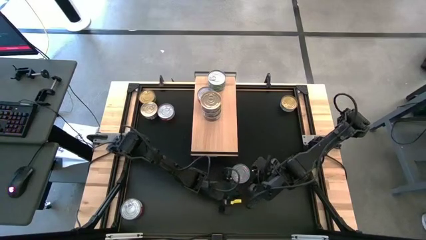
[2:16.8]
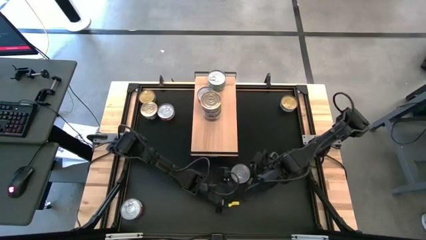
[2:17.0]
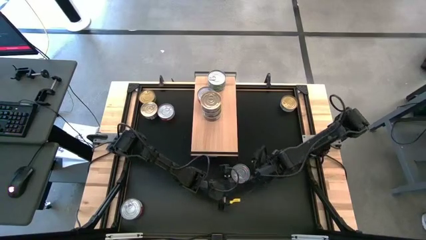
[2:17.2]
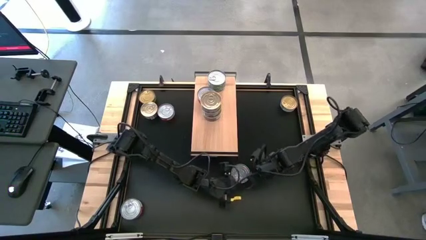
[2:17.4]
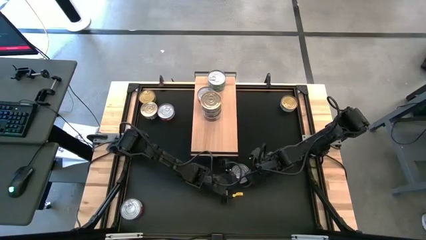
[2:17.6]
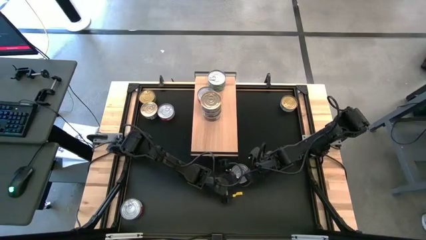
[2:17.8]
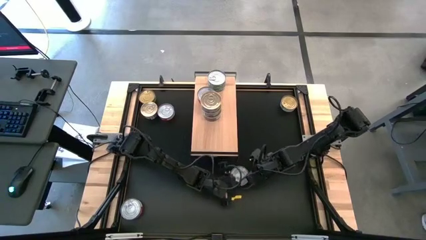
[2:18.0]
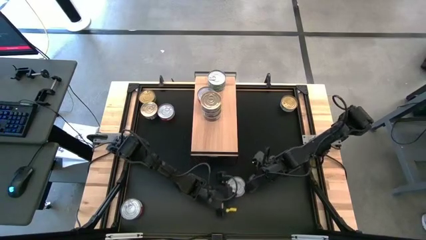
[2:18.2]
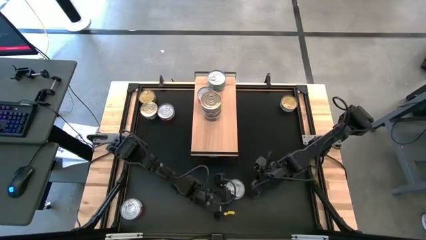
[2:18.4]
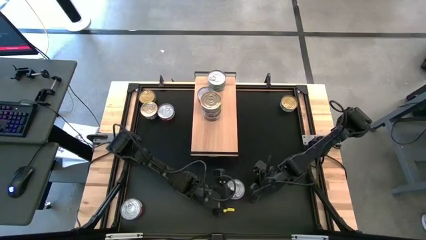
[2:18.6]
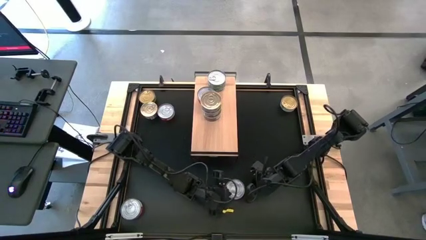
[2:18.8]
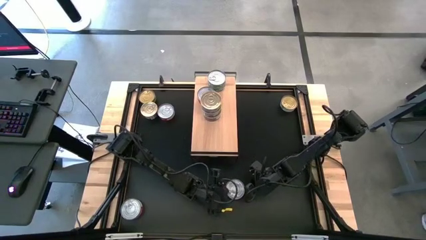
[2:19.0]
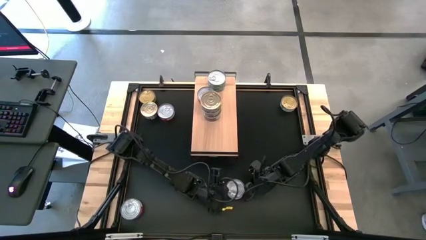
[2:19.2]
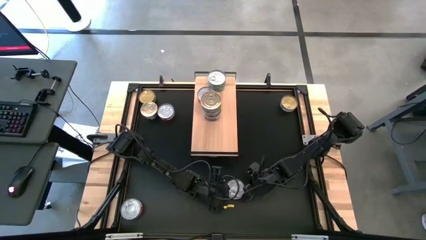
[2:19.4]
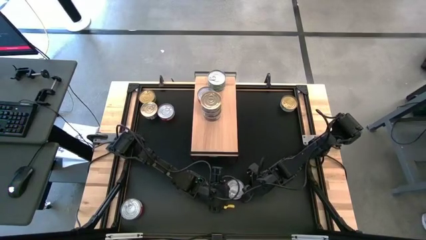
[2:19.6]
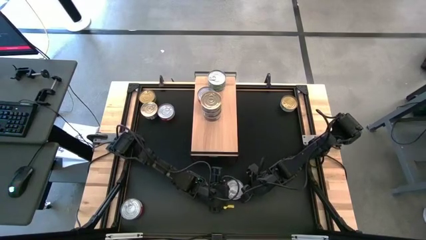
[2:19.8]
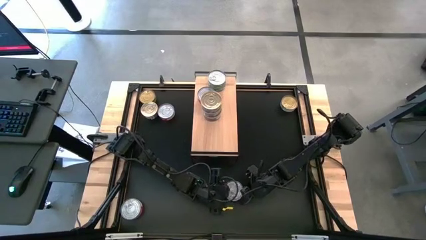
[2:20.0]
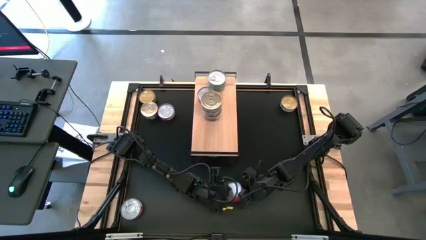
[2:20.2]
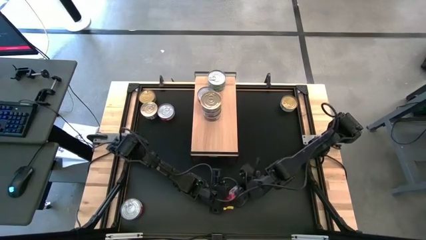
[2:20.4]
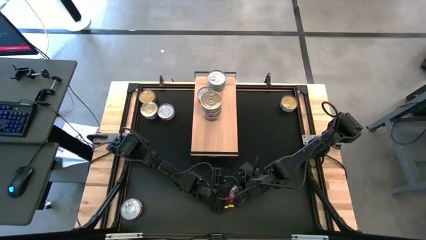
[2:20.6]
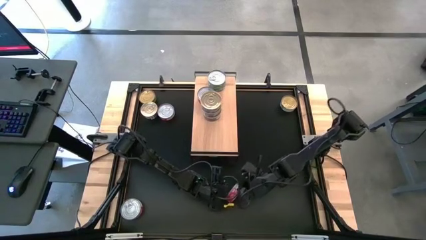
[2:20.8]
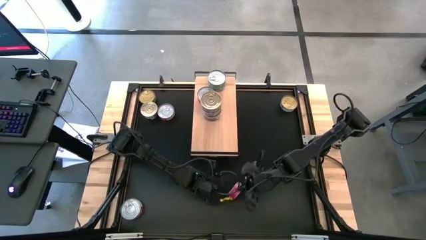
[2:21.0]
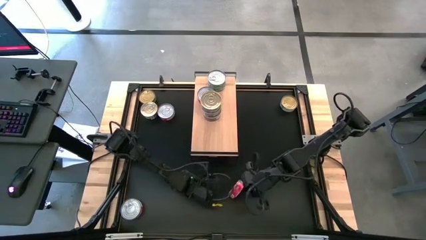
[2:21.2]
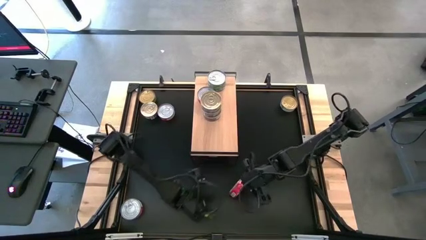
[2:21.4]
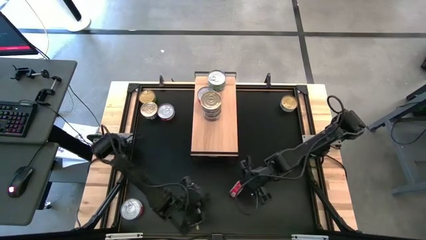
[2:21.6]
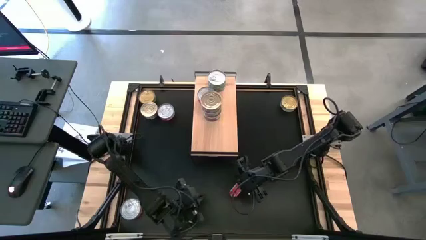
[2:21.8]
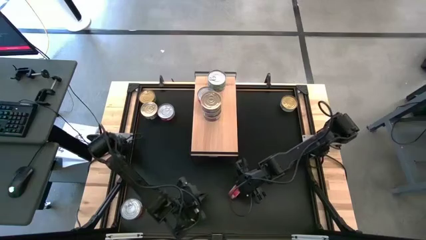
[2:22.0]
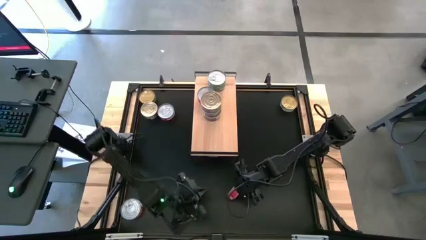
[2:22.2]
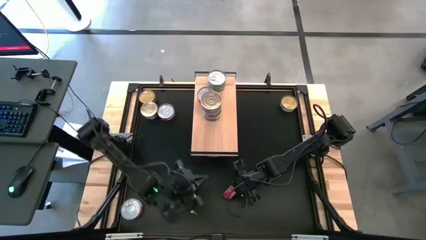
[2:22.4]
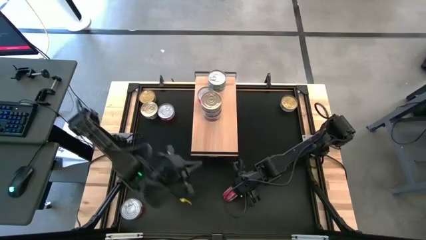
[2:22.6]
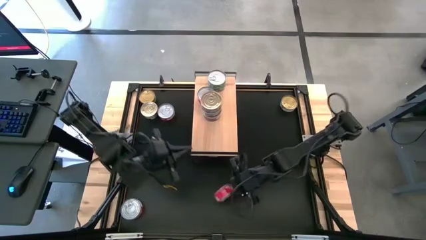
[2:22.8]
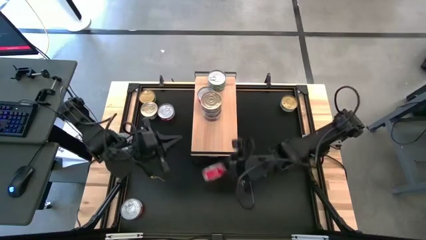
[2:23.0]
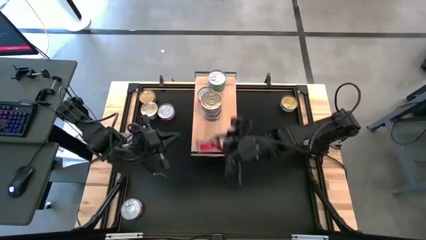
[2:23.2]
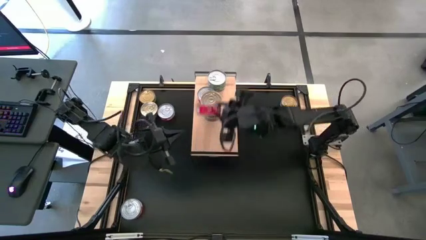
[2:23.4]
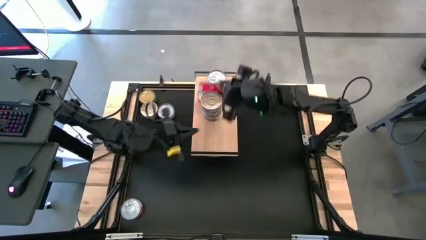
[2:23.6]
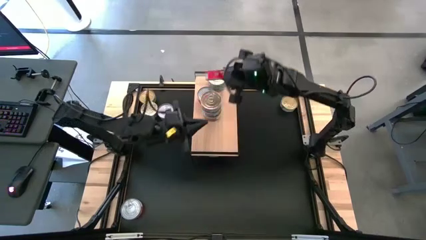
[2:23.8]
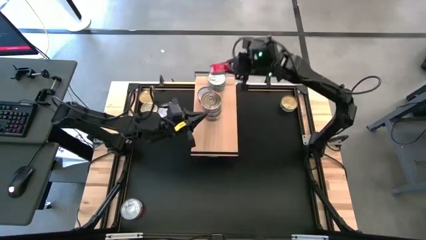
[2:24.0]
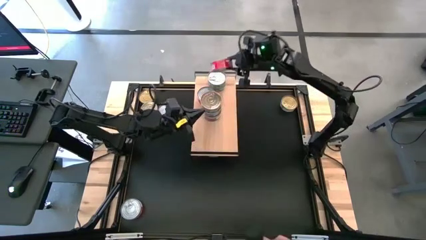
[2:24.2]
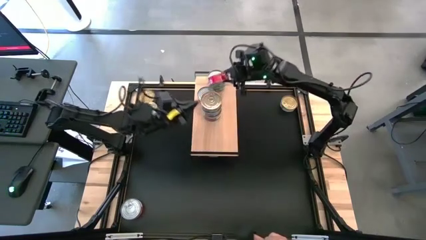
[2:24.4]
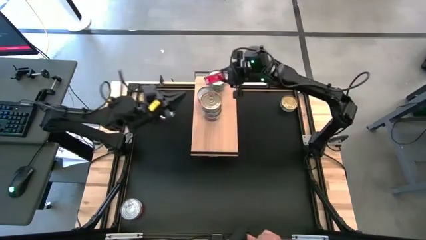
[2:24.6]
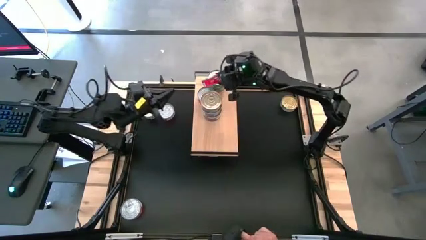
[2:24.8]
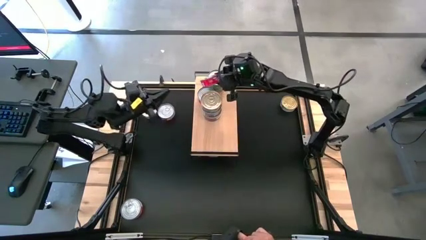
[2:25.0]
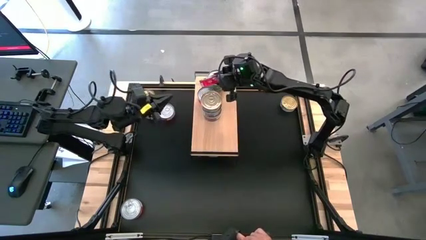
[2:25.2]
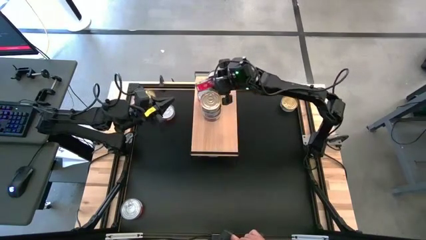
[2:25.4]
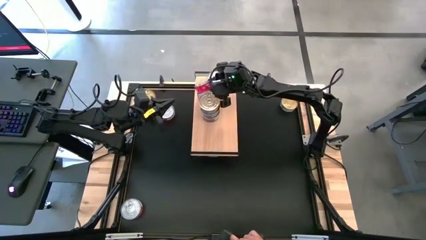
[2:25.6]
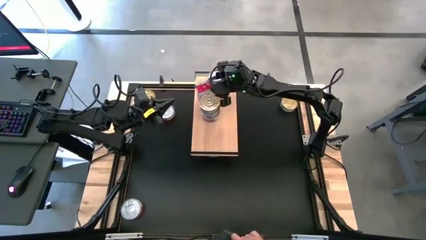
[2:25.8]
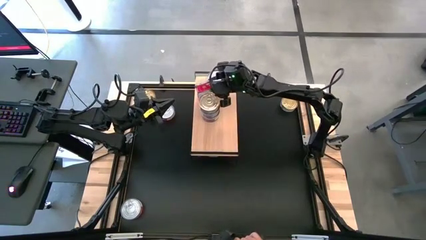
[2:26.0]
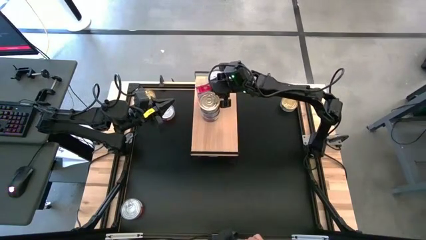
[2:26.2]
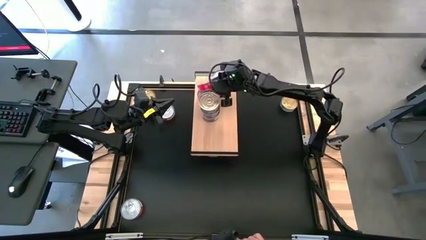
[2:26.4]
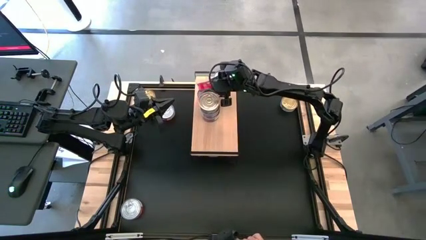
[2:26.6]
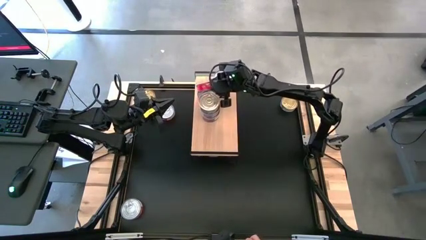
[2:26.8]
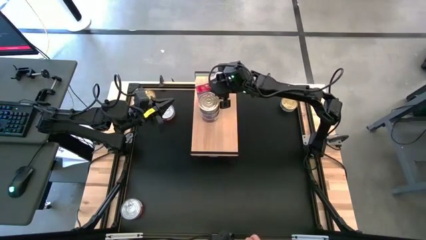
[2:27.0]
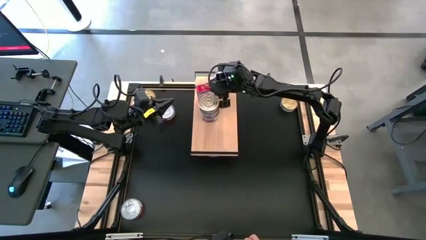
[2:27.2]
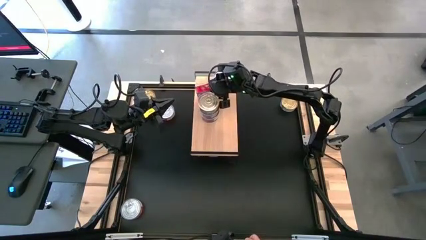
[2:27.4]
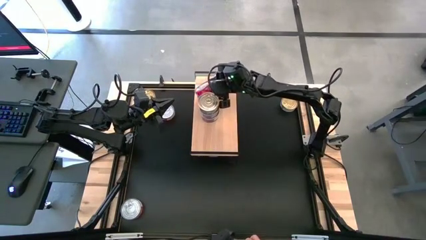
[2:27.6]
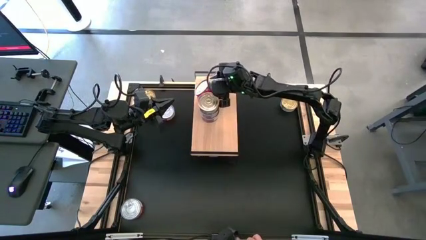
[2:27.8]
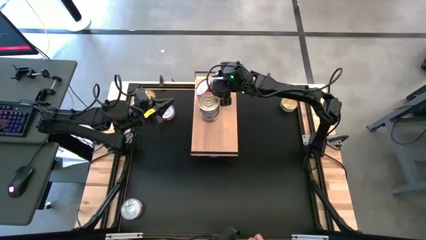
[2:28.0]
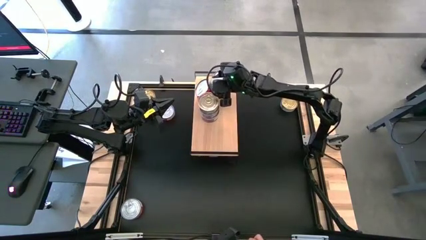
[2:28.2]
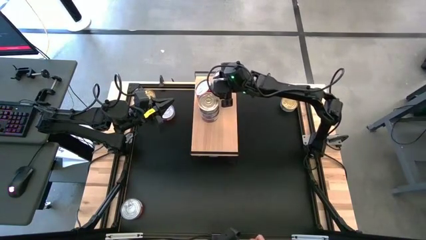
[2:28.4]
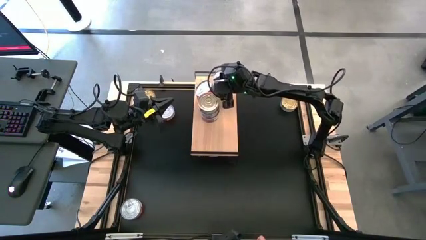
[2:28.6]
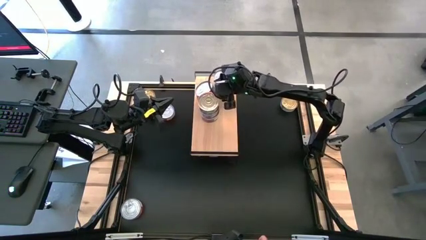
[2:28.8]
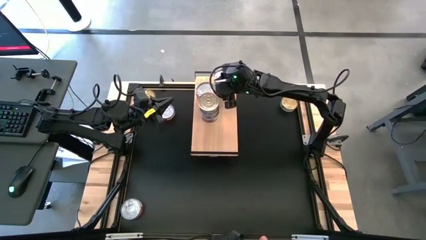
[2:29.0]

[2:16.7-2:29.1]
Task: Stack canned seafood by type on shelf
Stack the red tuna can on top of the red tuna can on the shelf

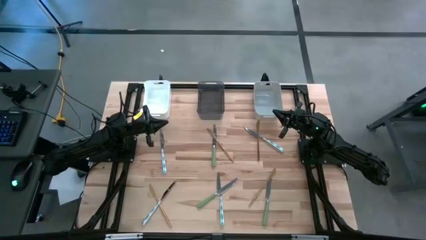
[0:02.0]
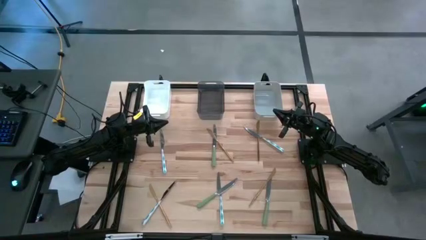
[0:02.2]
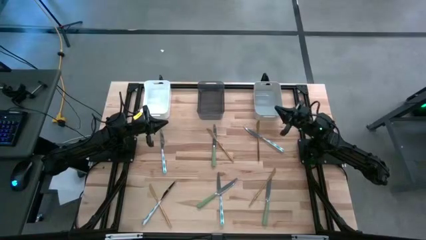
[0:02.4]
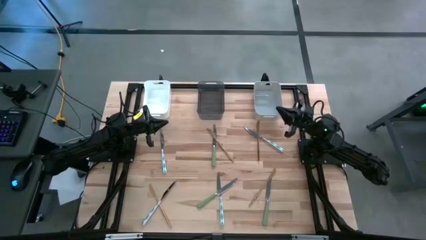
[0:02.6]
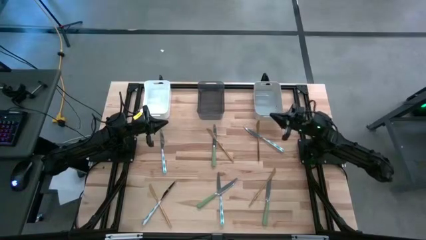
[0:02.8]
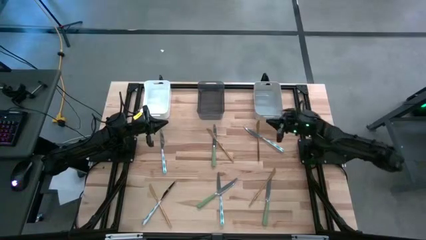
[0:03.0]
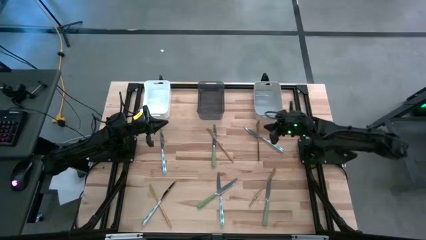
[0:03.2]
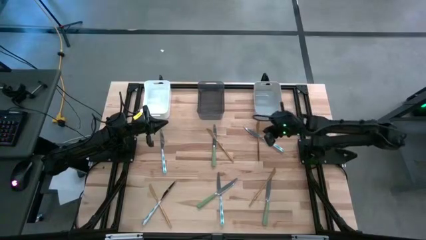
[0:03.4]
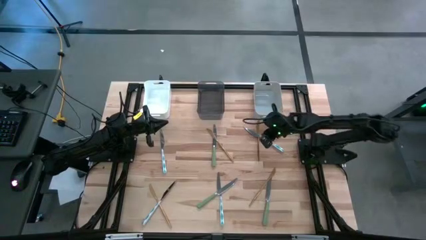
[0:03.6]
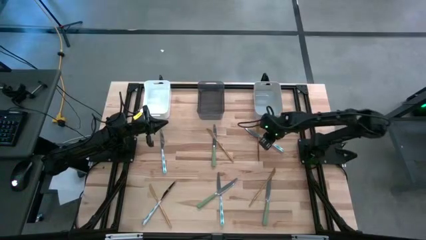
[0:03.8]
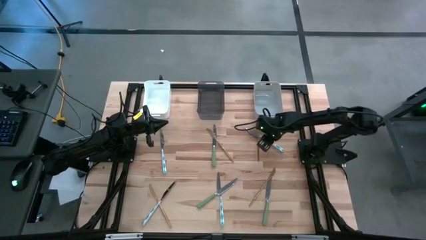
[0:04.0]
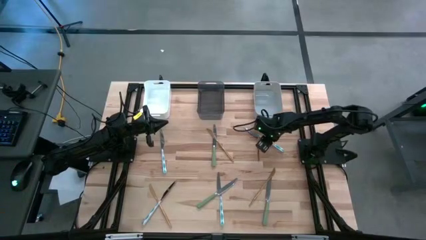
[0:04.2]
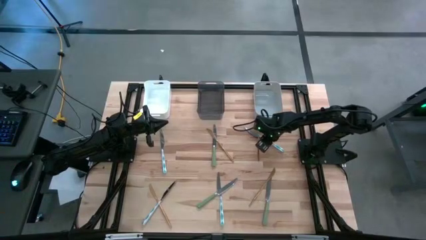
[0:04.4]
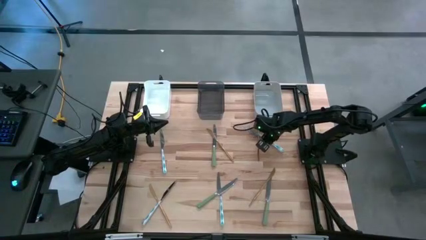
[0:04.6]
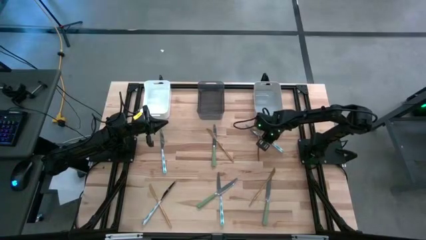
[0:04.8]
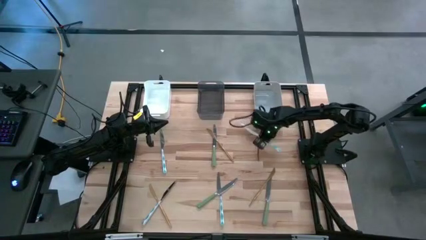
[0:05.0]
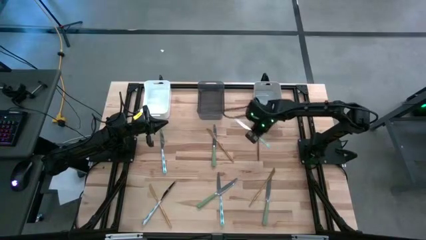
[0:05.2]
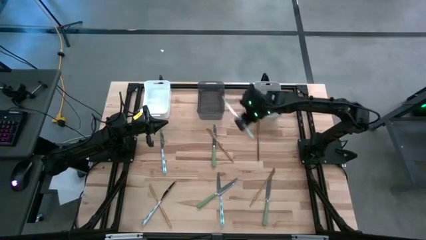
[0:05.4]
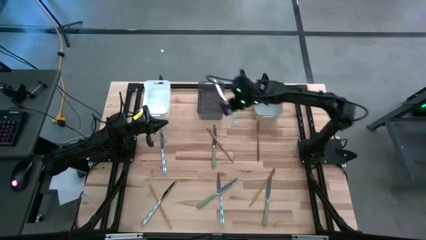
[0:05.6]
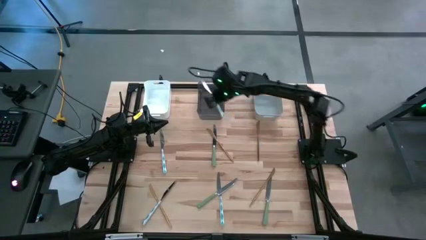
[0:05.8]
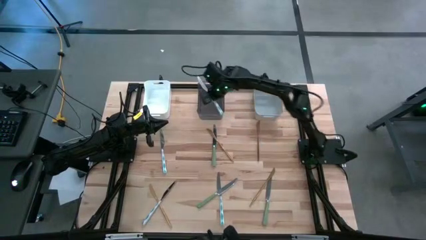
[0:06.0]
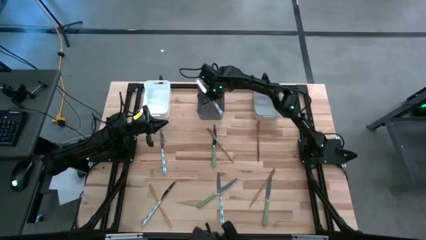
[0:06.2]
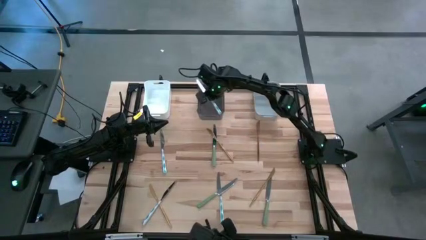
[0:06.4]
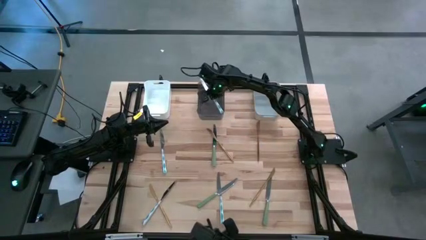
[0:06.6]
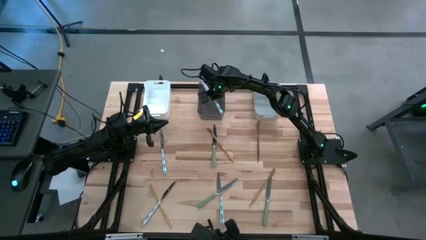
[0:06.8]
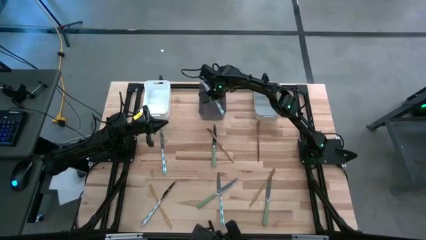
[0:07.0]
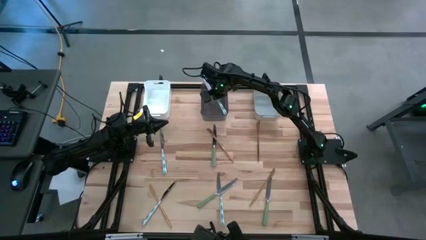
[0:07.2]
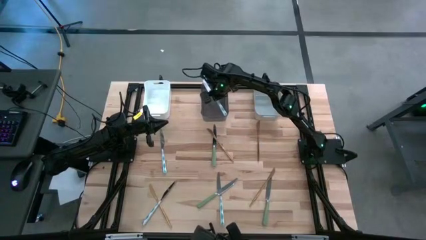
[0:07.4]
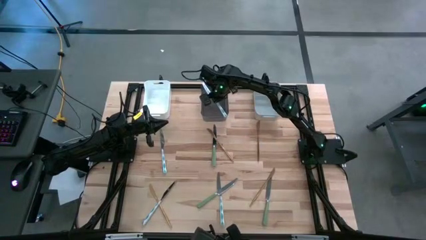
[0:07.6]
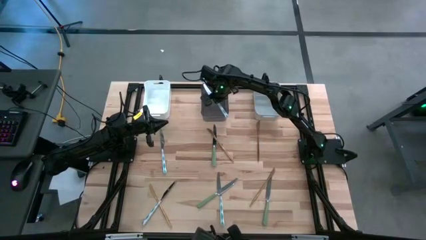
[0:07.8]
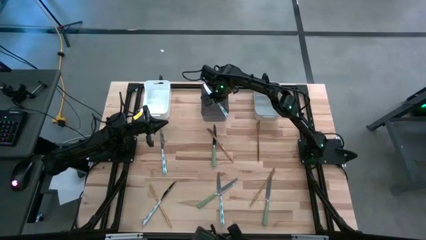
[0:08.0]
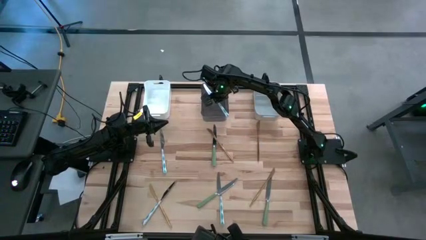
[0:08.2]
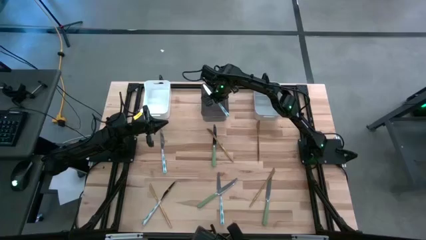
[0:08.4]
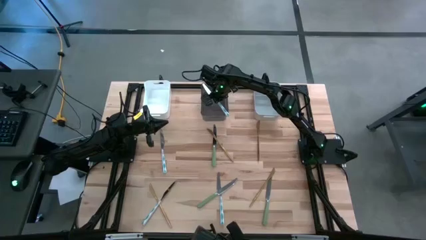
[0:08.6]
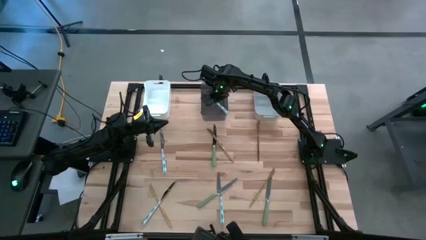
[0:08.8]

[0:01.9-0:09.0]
Task: Sort silverware by color (type)
Put the top right blue table knife into the black bin
